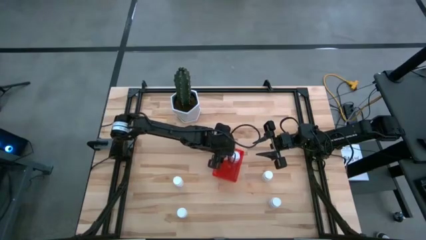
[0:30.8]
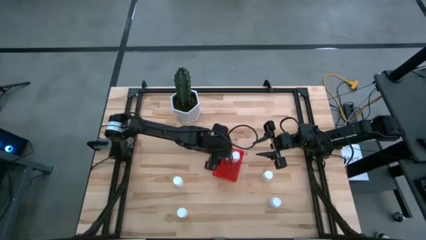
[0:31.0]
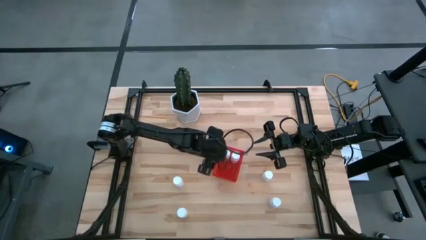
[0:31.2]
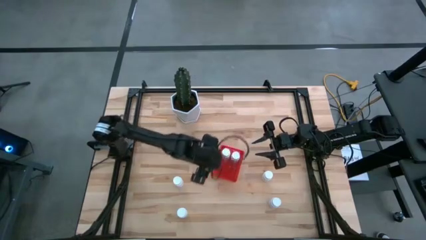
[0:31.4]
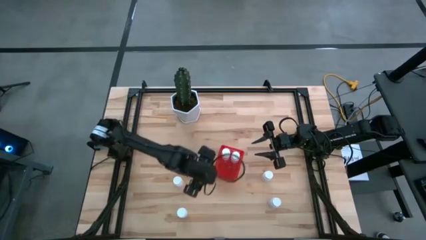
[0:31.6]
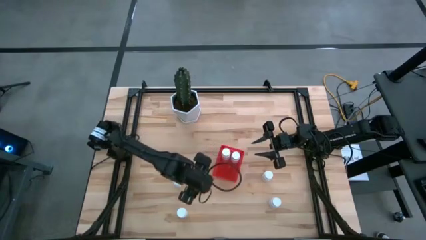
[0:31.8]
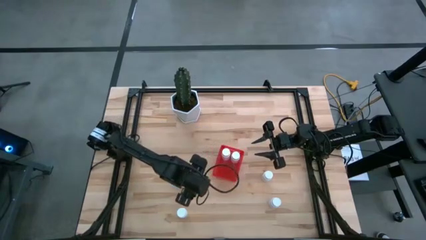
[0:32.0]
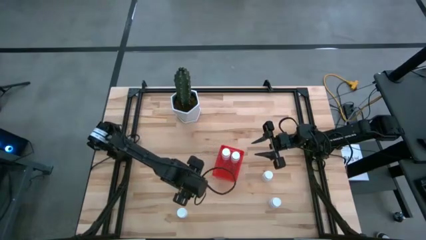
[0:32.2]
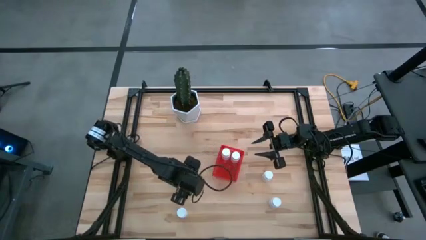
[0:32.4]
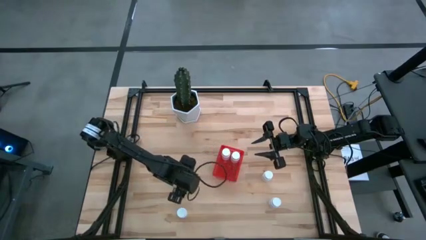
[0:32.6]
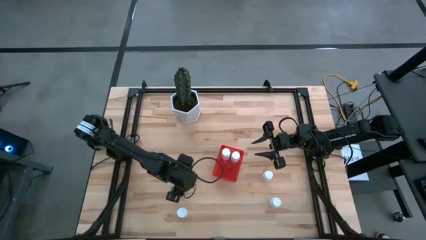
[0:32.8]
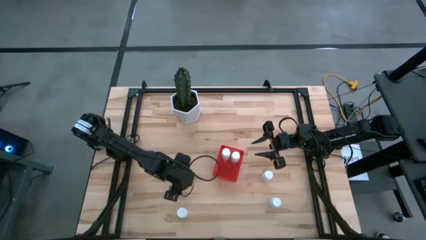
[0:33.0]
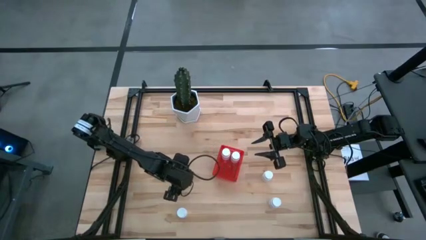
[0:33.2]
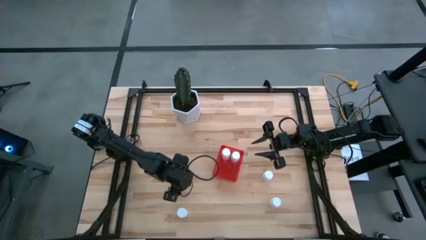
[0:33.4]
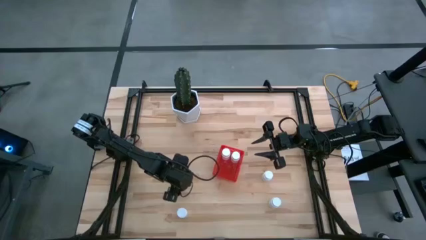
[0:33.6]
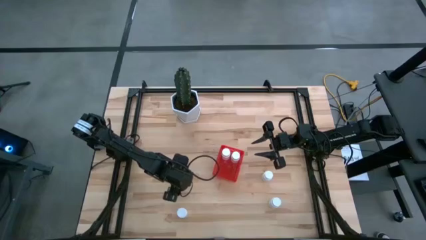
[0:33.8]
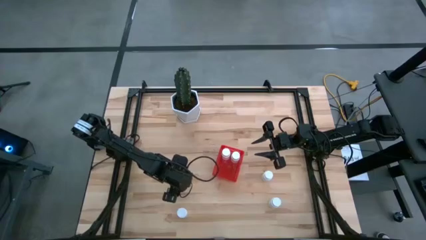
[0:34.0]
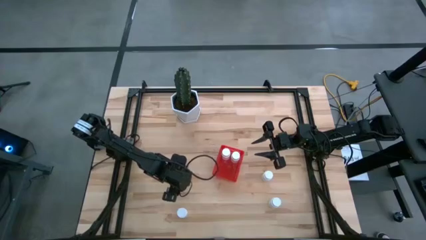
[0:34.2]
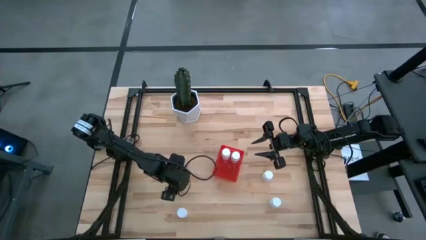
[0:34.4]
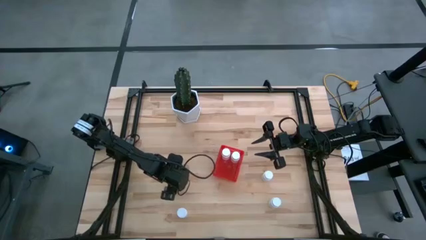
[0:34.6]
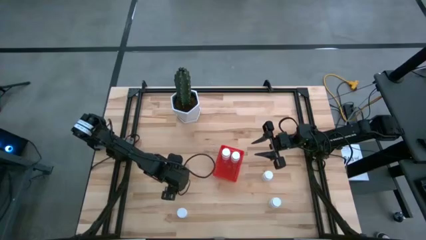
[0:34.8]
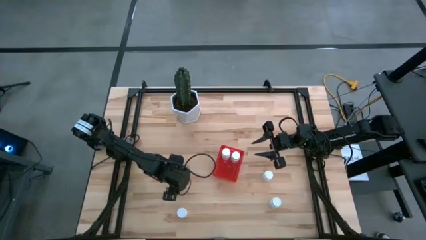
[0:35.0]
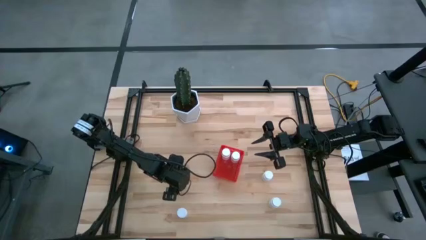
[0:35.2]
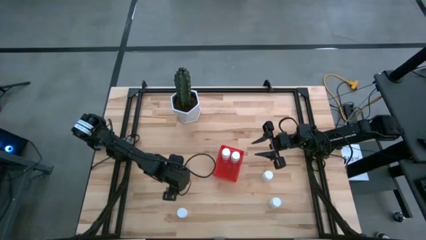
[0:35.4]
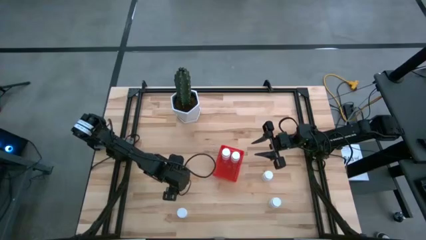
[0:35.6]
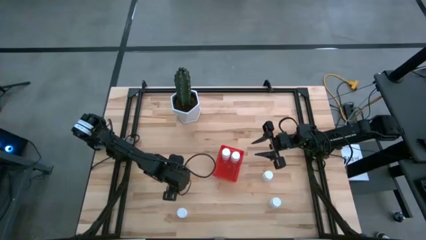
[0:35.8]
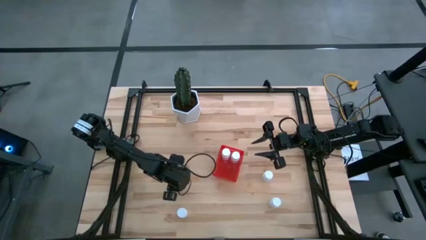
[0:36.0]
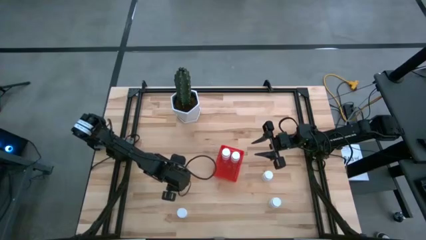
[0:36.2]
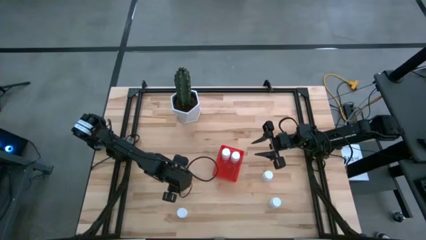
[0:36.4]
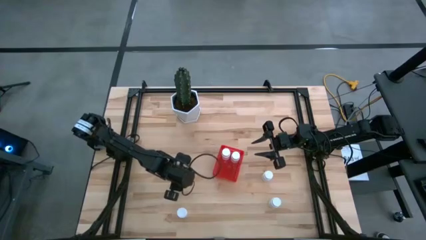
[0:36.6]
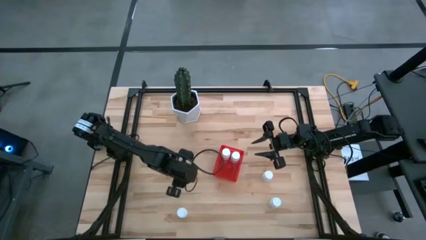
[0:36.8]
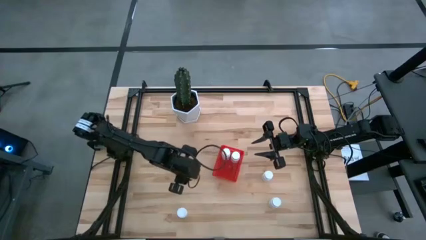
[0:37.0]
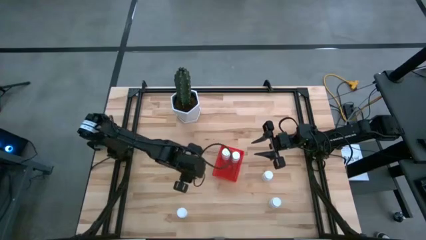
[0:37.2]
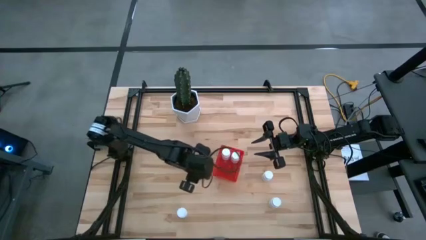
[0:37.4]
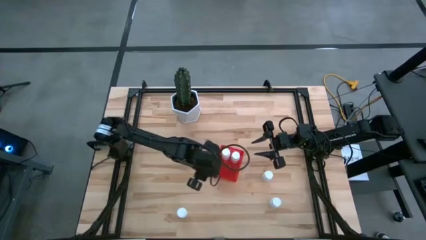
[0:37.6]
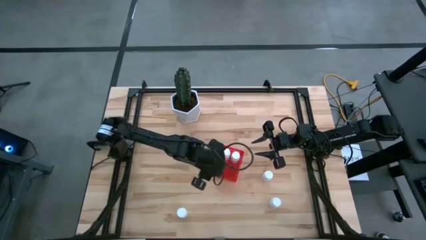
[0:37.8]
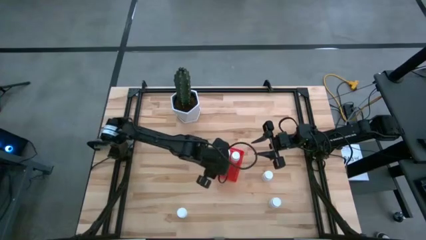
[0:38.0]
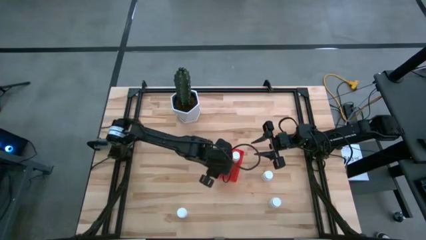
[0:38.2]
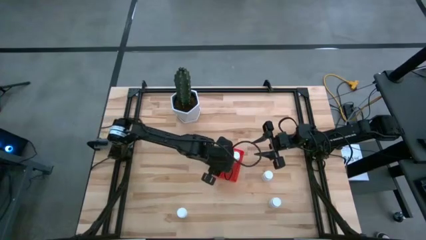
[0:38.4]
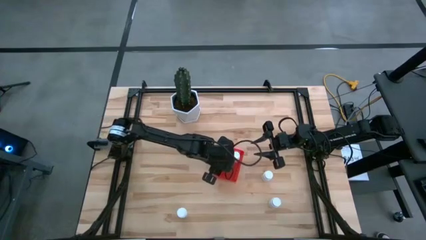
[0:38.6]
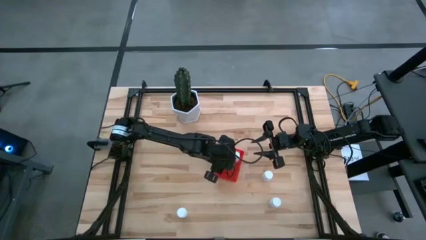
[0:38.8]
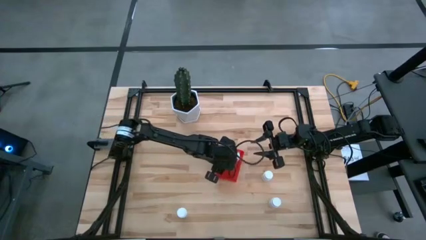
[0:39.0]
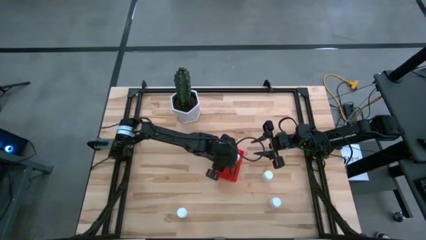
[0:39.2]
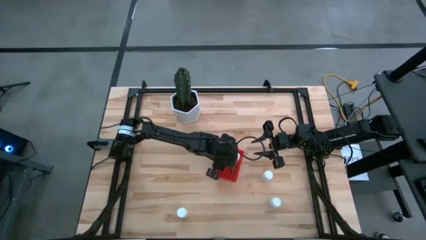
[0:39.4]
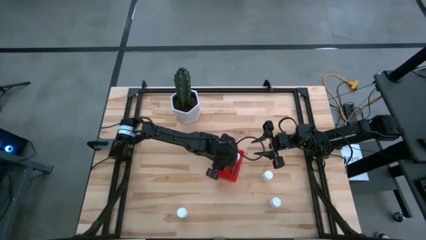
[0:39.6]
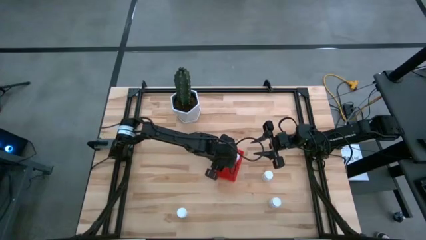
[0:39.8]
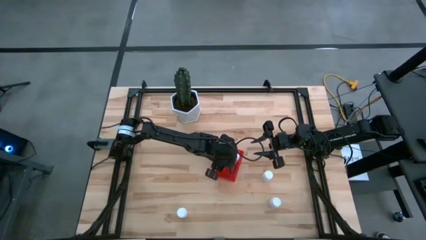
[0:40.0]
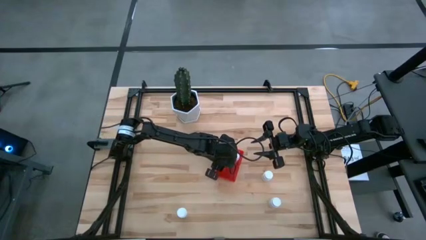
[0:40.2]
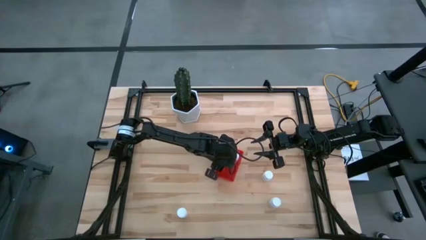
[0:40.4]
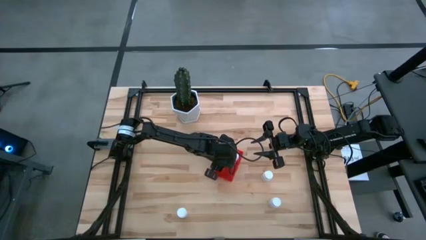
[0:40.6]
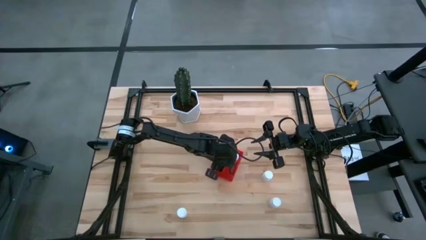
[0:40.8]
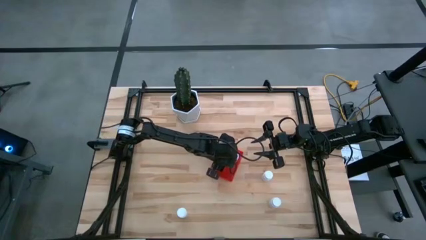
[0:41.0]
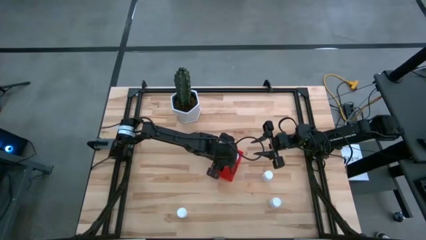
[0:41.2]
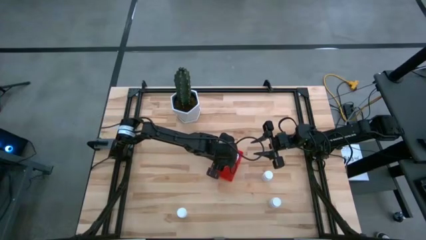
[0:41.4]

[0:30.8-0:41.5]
Task: Pick and place pill bottles into a basket
Put the white pill bottle into the red bin
